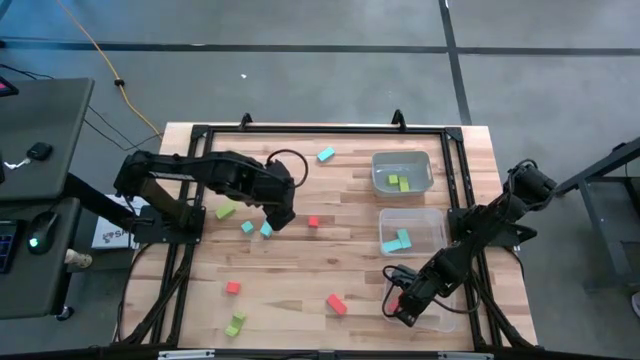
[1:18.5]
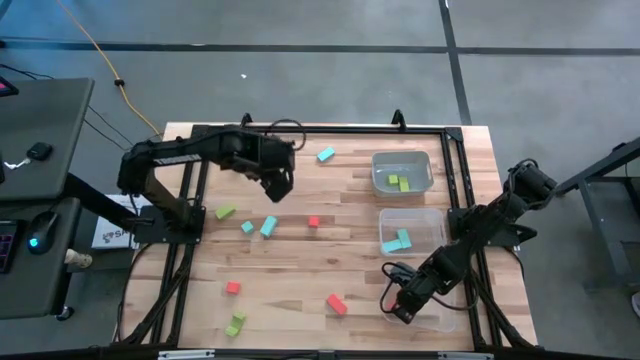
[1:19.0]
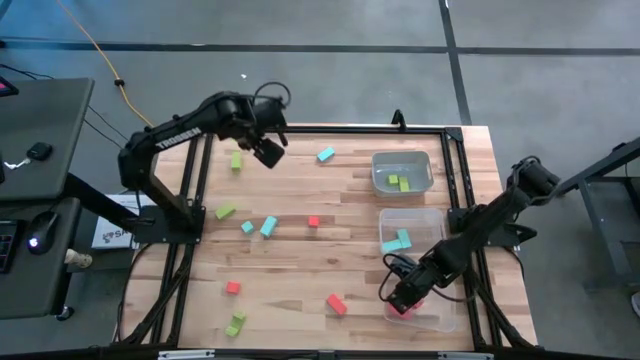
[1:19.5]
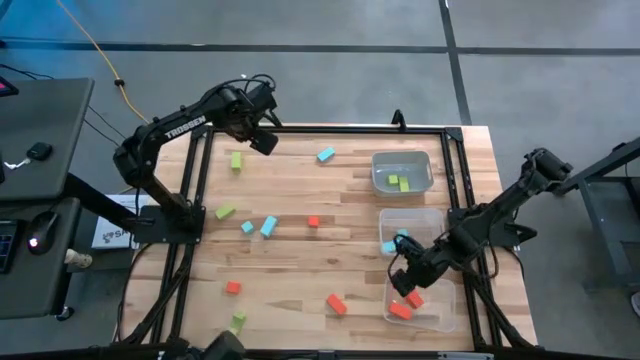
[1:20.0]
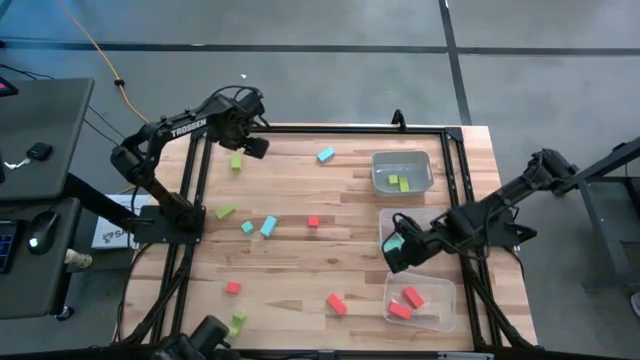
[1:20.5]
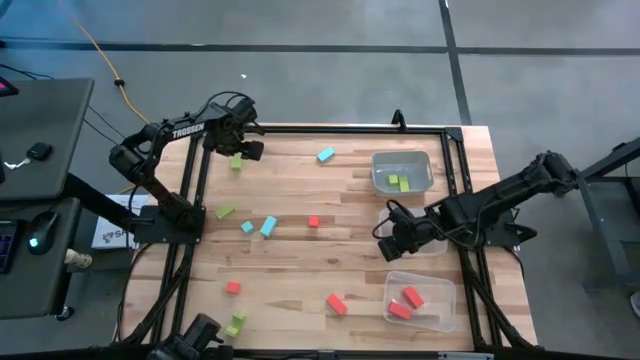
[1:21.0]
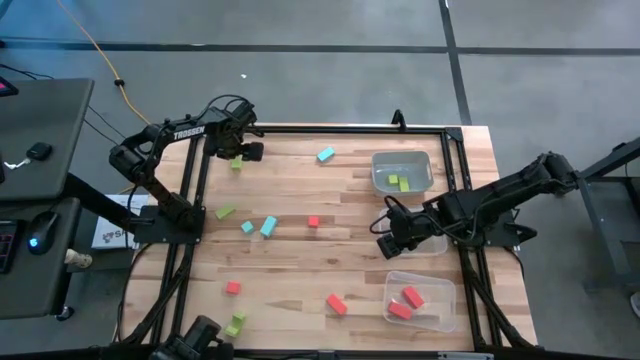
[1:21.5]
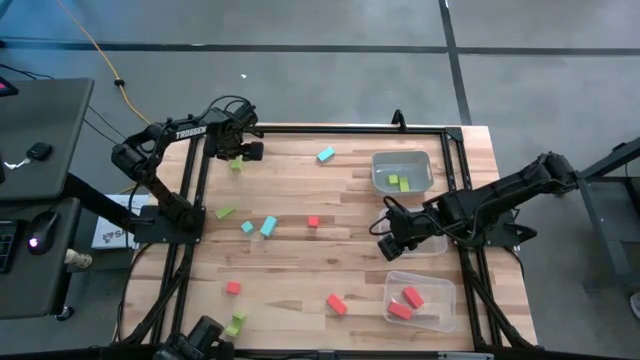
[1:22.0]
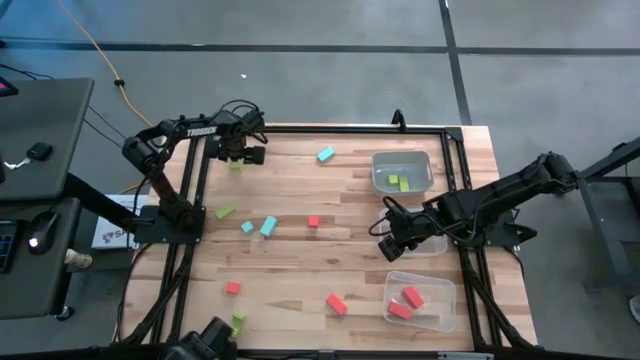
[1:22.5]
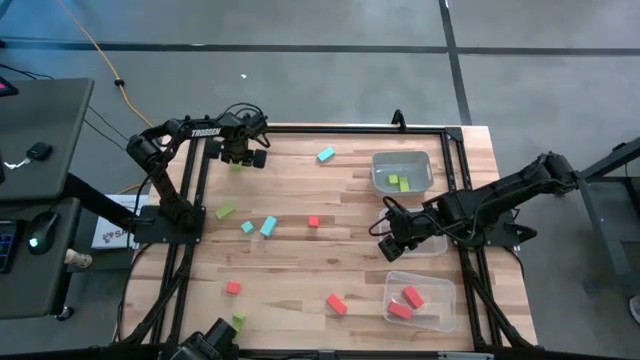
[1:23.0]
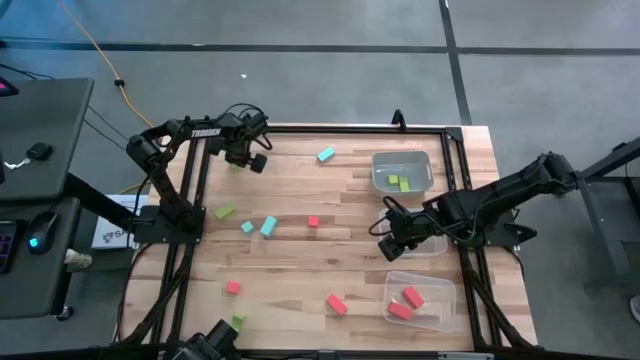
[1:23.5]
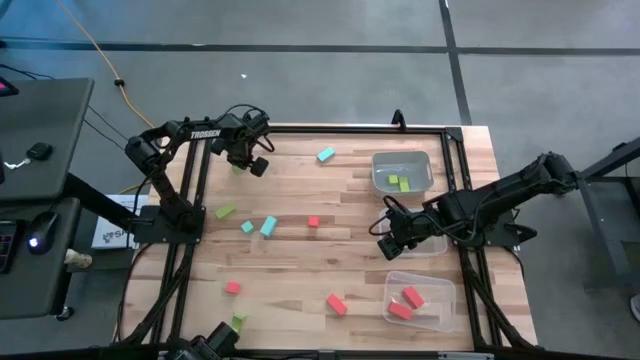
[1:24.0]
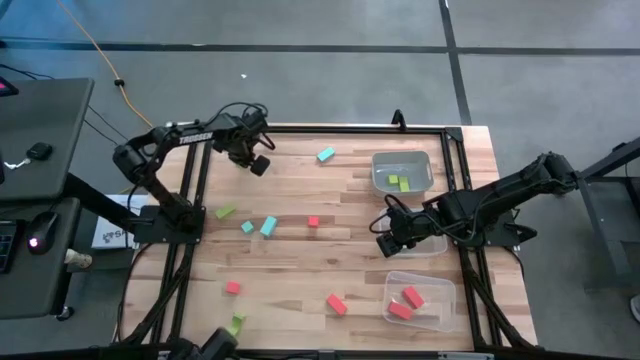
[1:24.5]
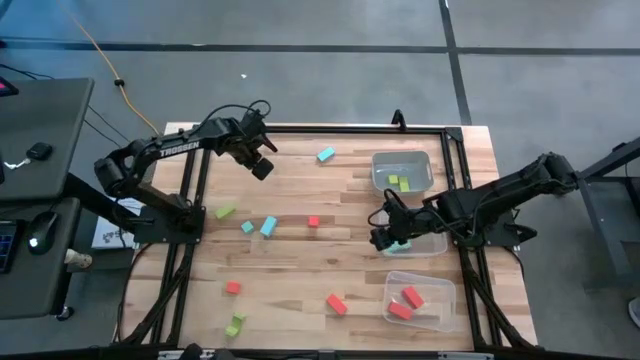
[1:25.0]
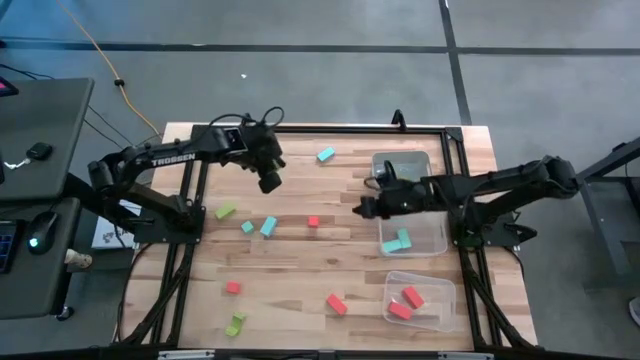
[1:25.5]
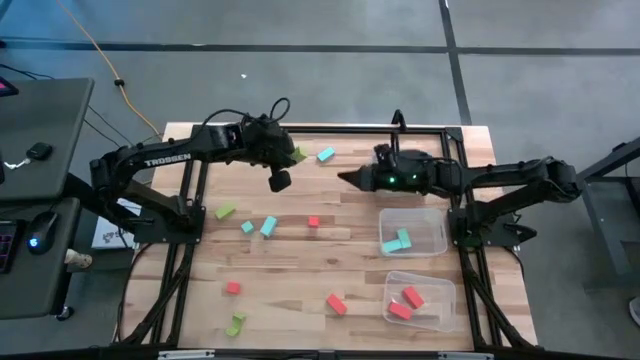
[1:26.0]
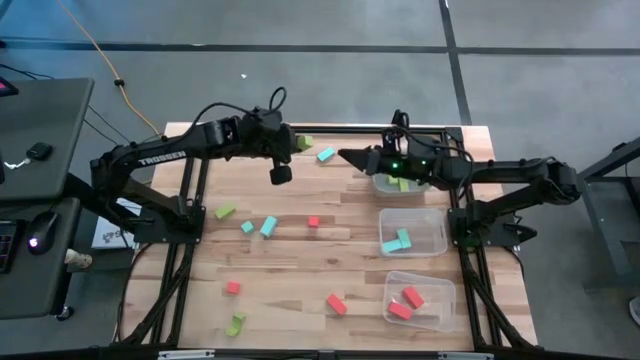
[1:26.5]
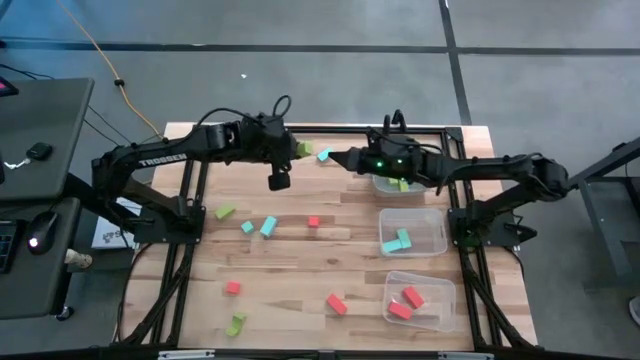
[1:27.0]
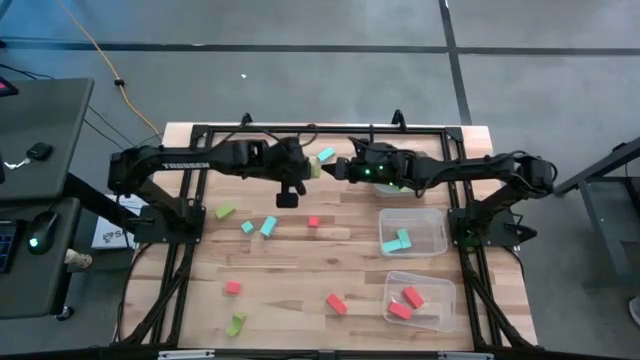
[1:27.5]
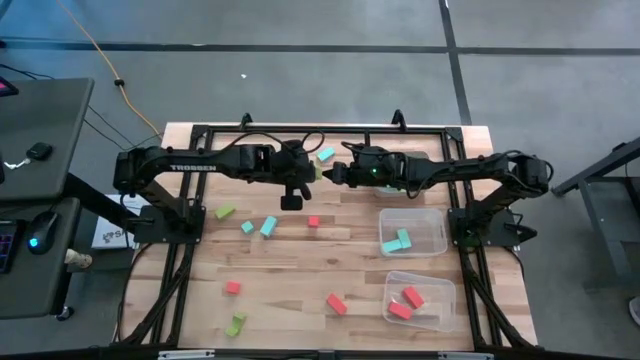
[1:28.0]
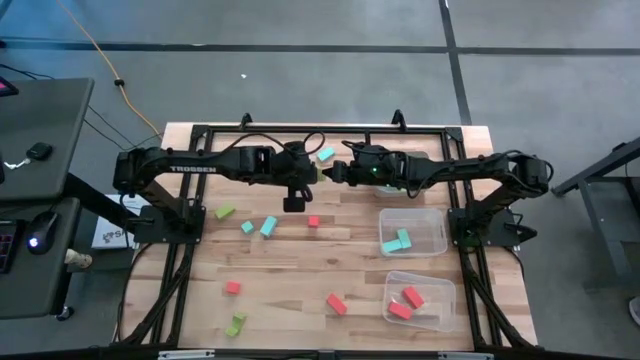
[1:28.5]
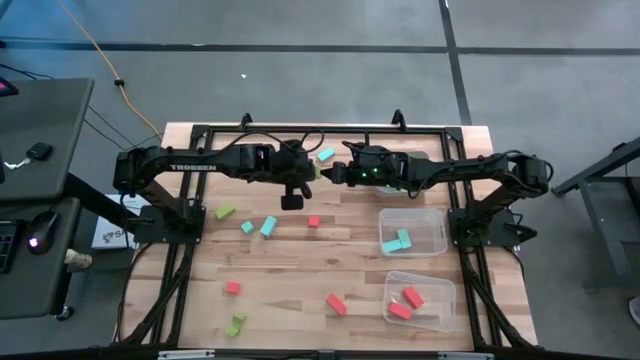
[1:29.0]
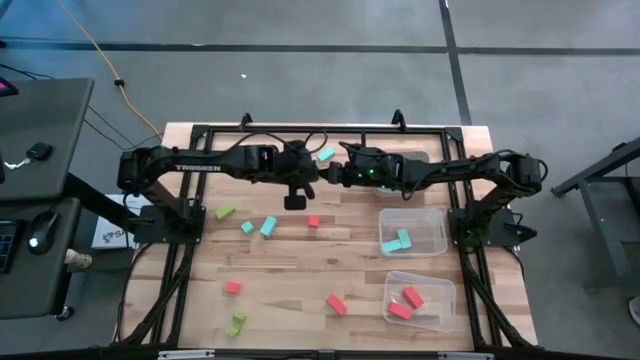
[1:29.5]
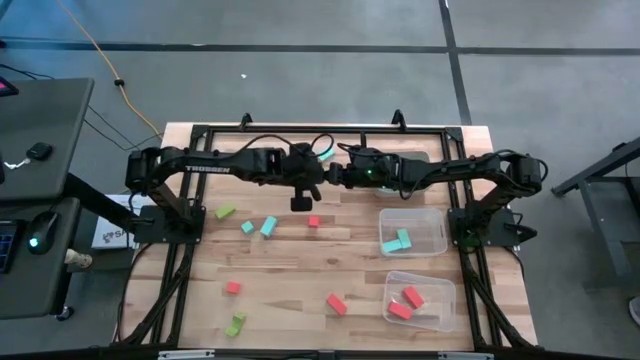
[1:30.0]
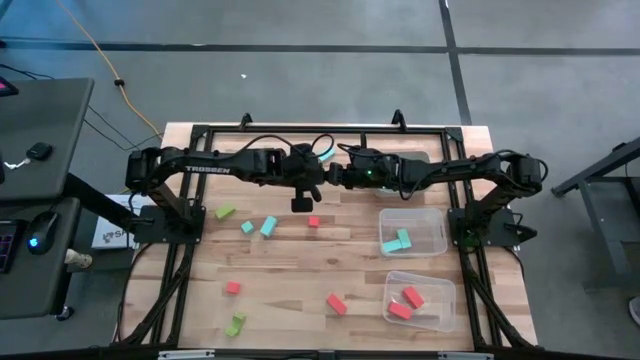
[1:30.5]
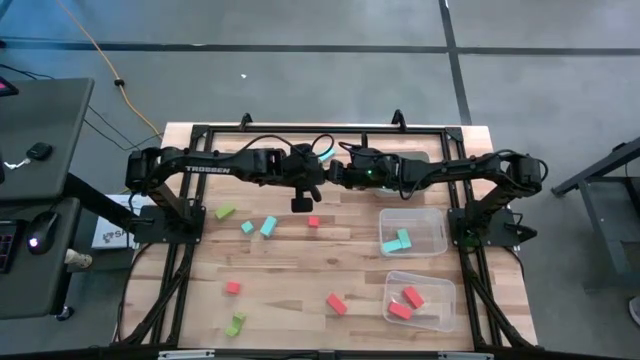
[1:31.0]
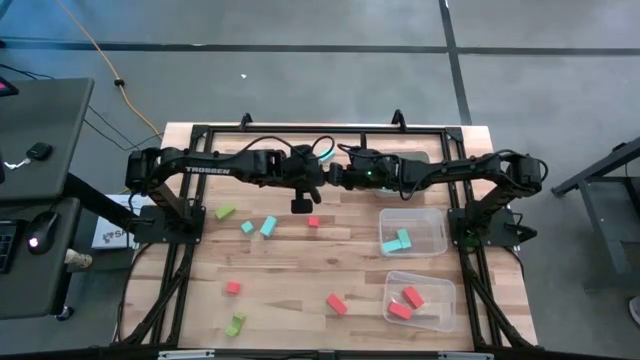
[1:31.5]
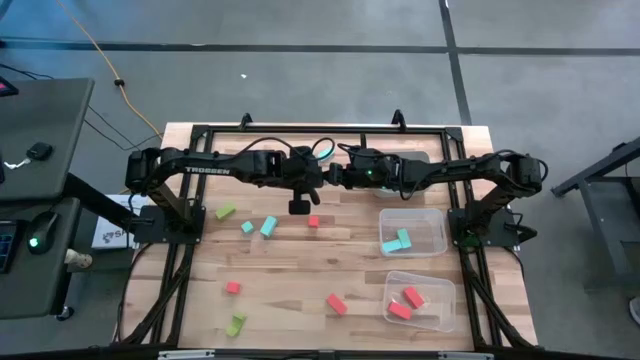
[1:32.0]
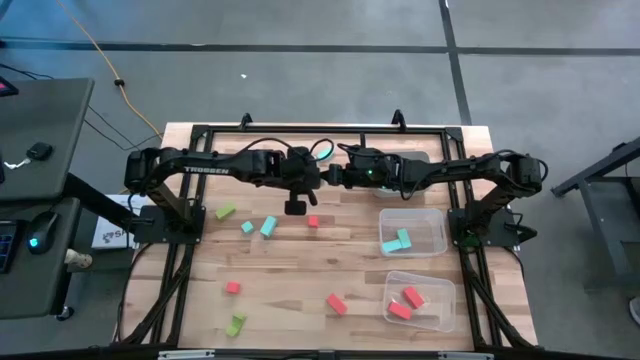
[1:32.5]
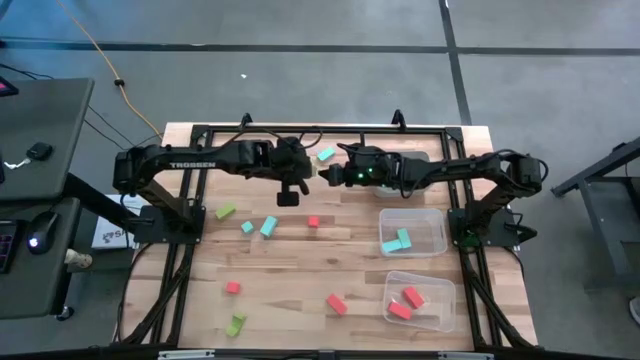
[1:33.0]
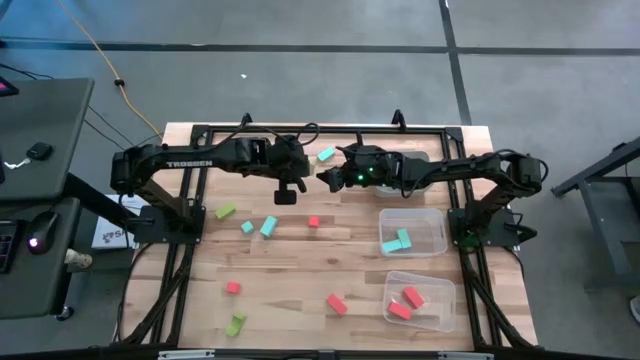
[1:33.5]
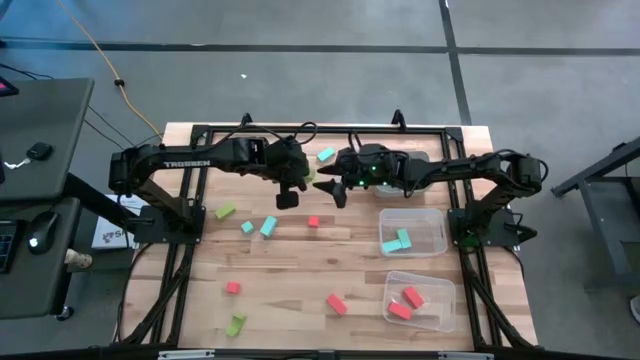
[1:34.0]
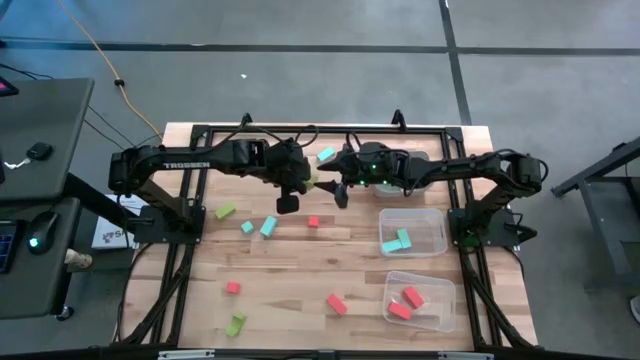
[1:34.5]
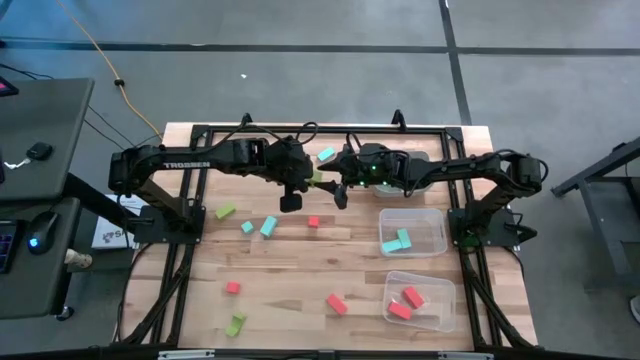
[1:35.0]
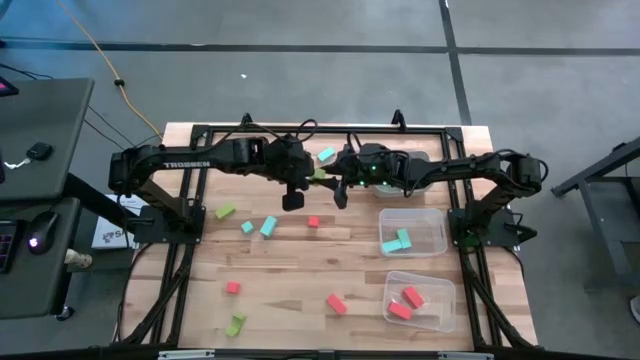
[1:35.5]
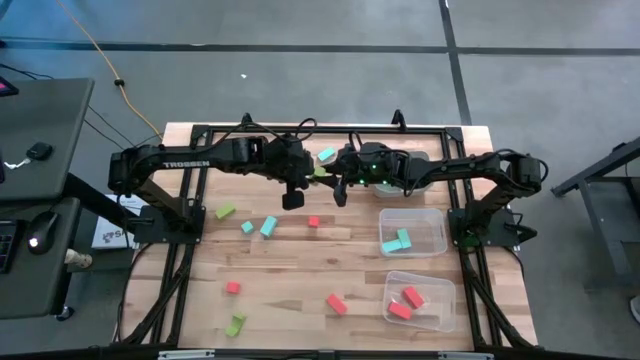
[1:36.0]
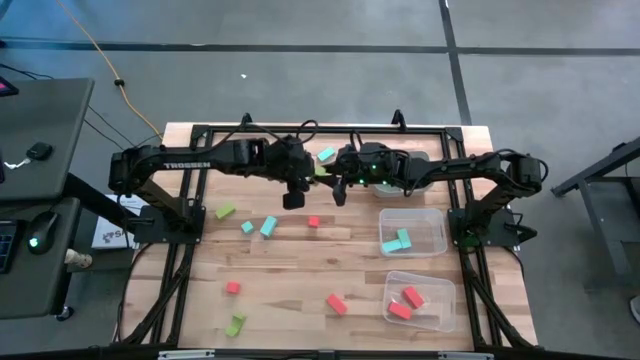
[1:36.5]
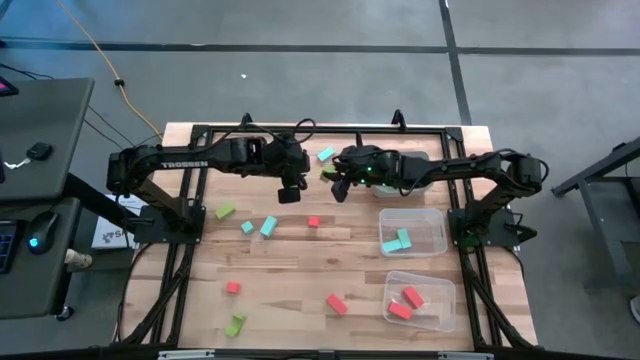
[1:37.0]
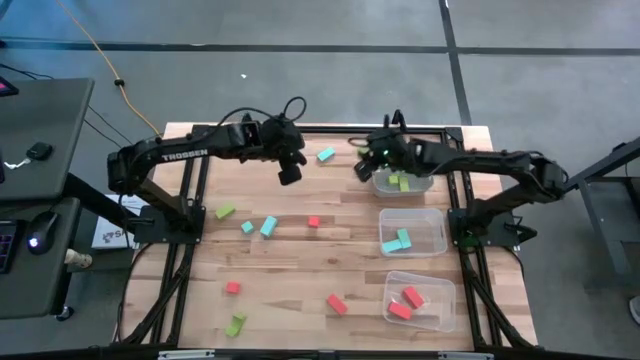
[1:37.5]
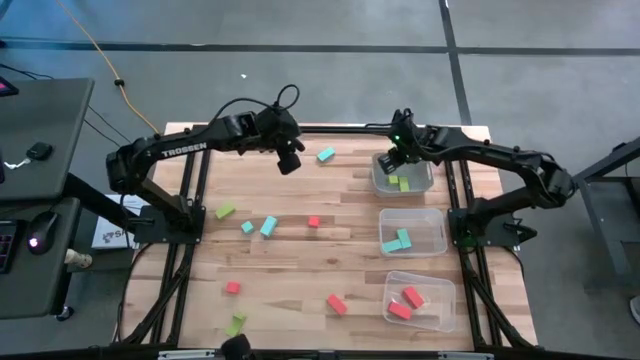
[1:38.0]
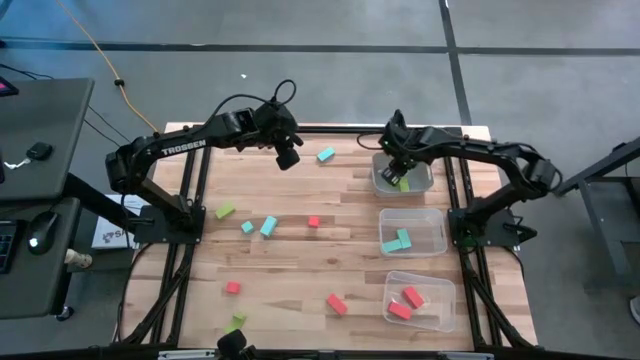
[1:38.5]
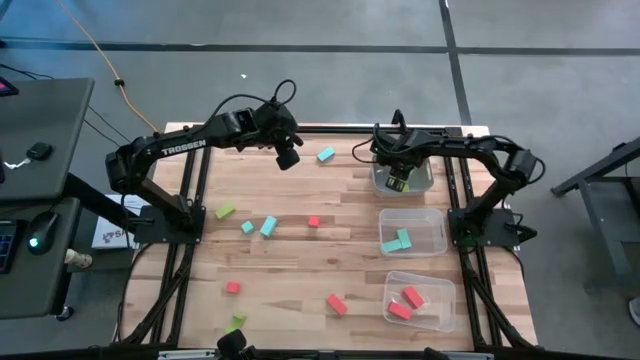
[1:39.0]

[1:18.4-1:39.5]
Task: Sort & place blocks by color
Put the light green block into the gray bin

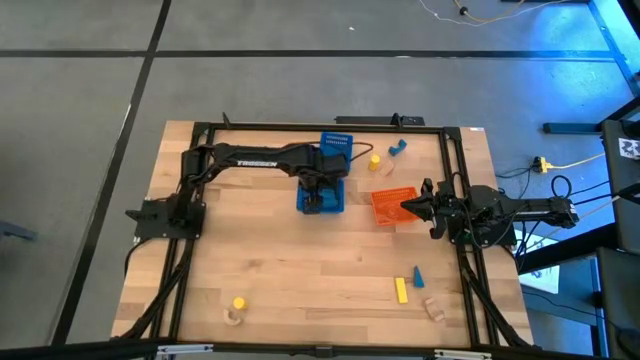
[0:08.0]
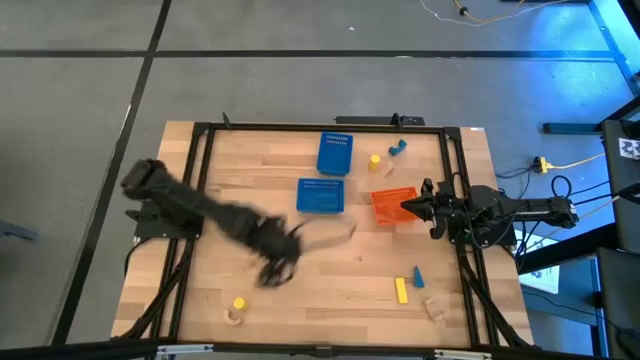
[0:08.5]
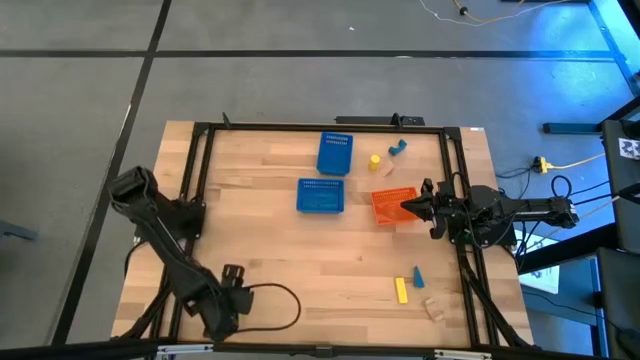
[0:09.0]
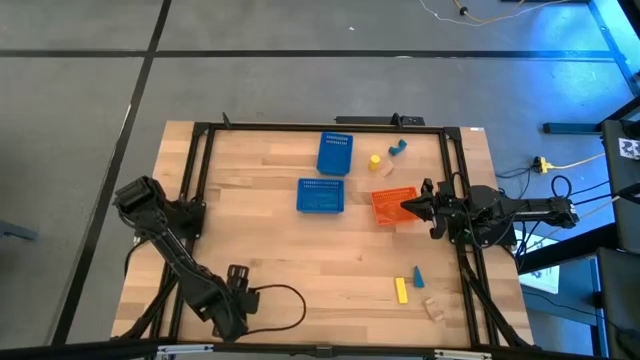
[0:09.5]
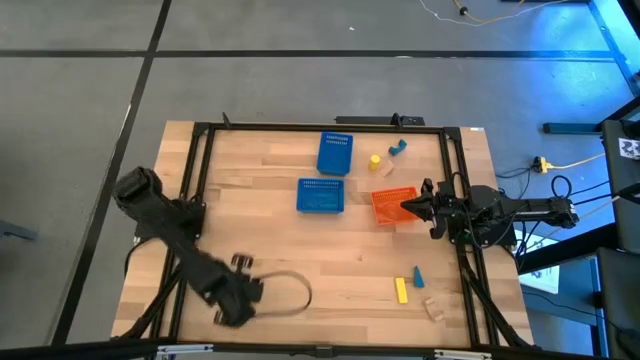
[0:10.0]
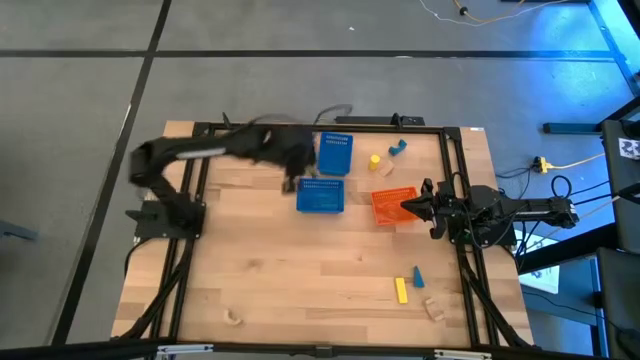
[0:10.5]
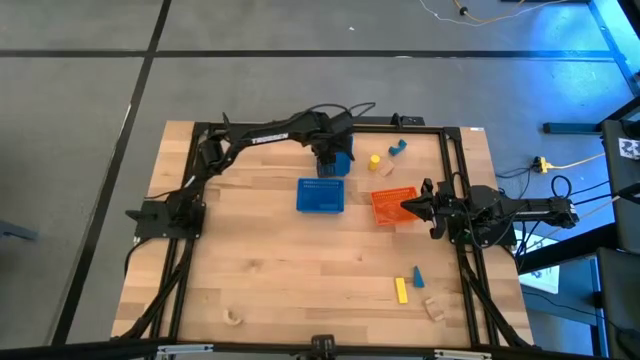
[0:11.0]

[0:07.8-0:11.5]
Task: Sort & place blocks by color
Put the bottom left yellow block into the top blue basket
